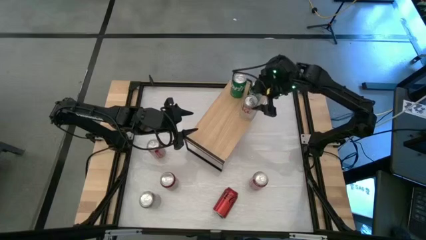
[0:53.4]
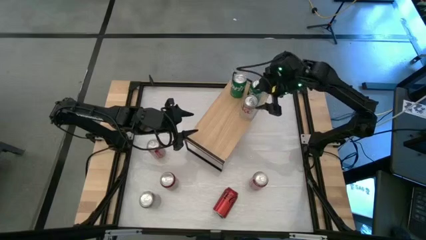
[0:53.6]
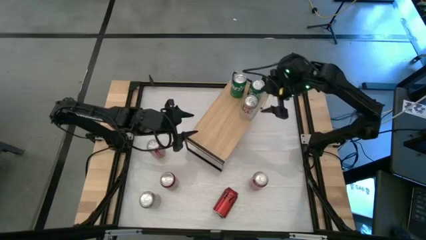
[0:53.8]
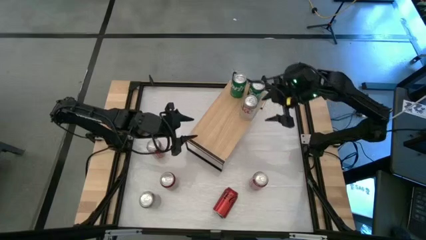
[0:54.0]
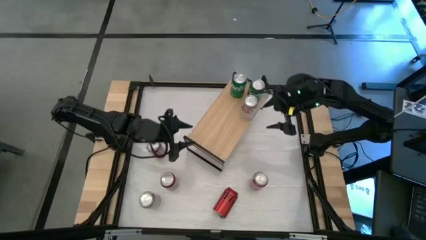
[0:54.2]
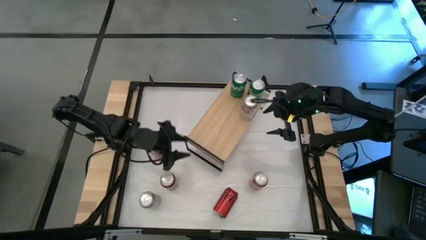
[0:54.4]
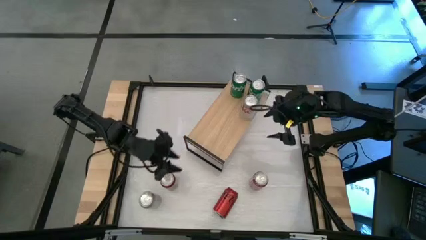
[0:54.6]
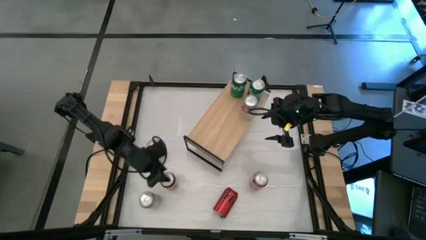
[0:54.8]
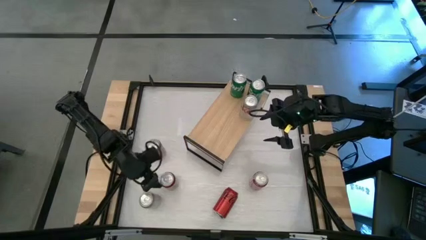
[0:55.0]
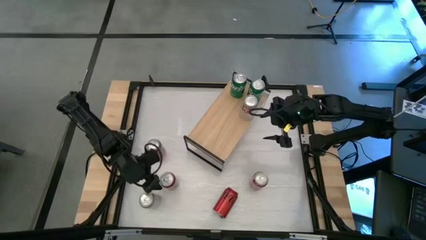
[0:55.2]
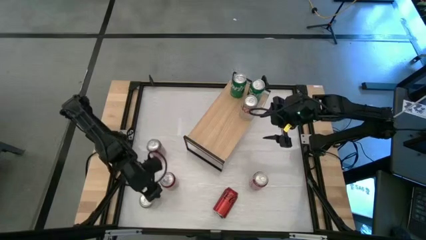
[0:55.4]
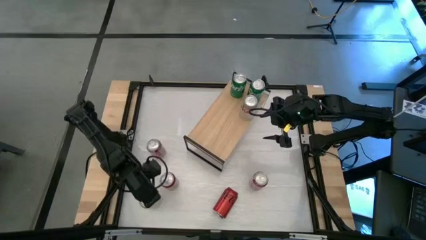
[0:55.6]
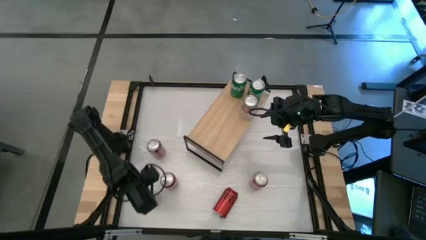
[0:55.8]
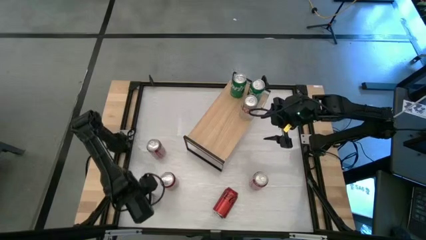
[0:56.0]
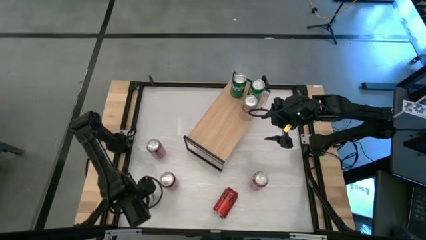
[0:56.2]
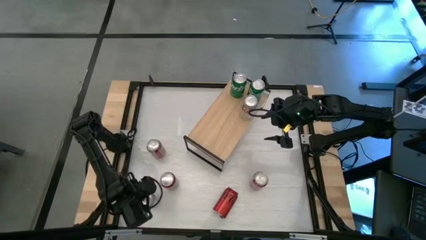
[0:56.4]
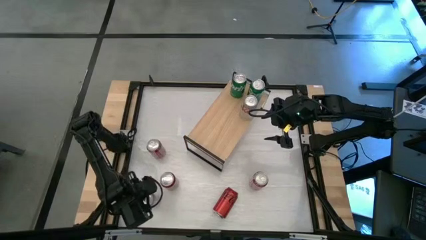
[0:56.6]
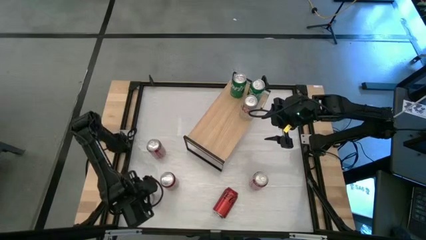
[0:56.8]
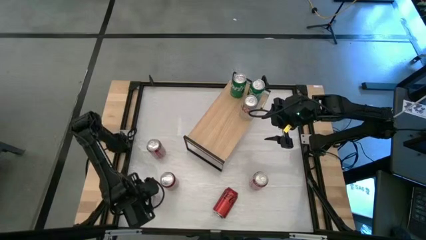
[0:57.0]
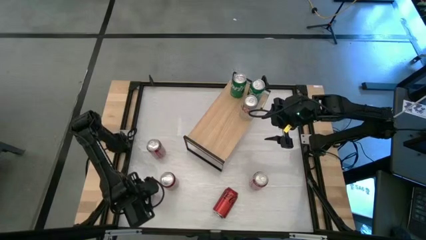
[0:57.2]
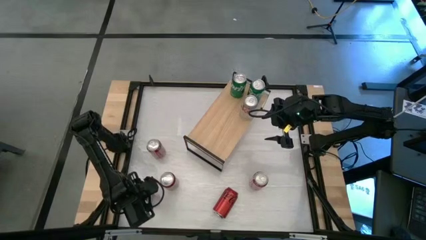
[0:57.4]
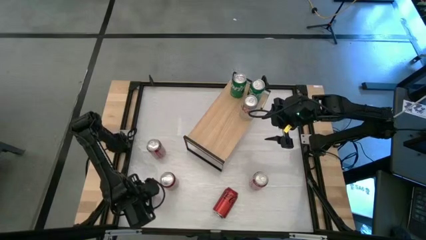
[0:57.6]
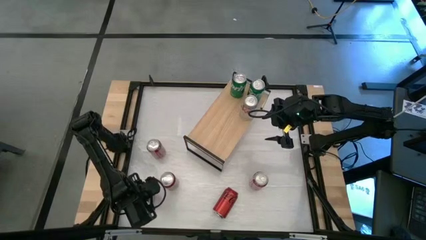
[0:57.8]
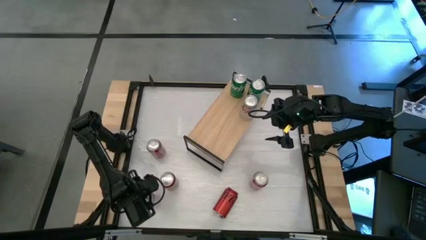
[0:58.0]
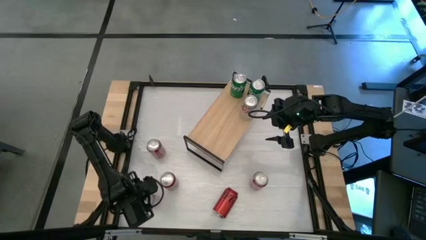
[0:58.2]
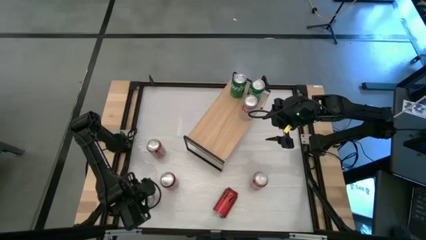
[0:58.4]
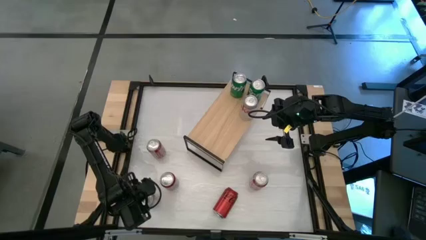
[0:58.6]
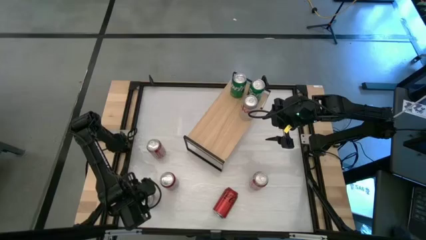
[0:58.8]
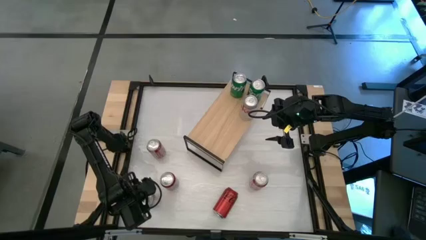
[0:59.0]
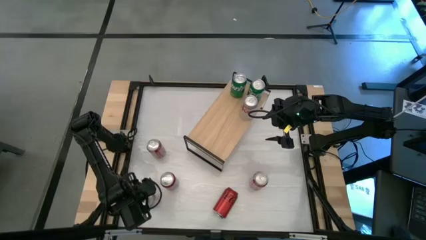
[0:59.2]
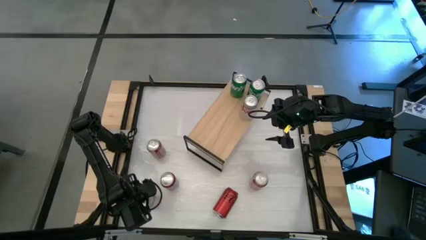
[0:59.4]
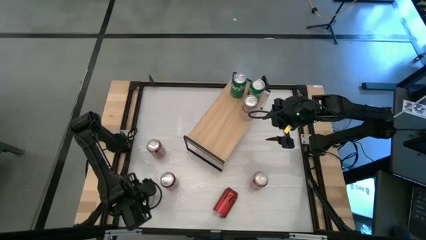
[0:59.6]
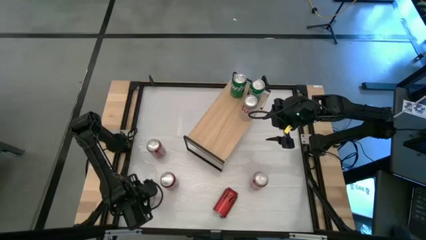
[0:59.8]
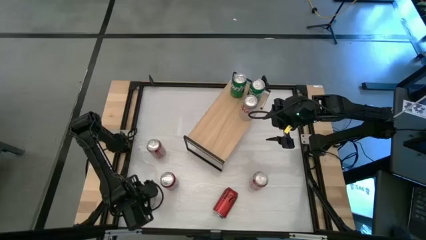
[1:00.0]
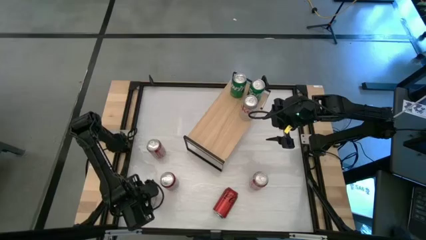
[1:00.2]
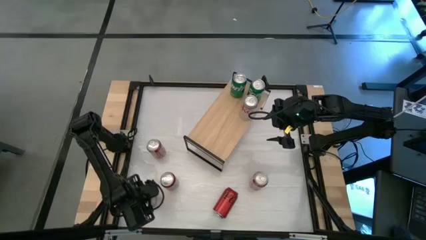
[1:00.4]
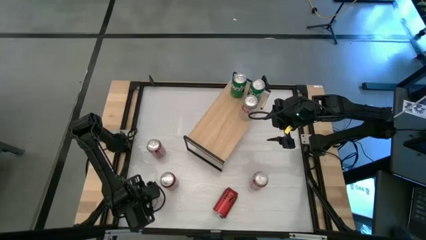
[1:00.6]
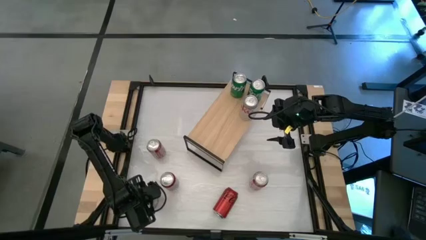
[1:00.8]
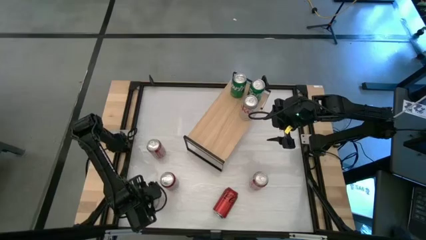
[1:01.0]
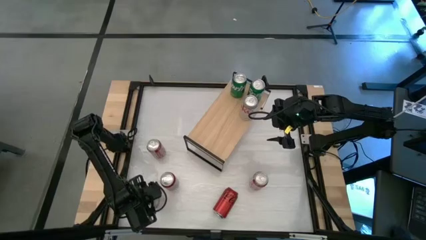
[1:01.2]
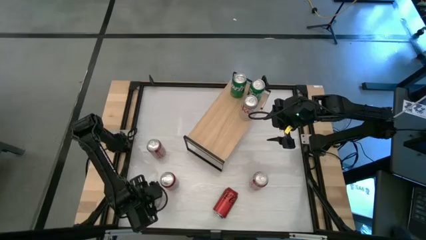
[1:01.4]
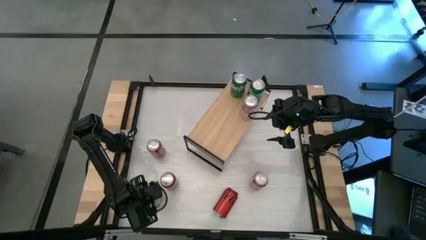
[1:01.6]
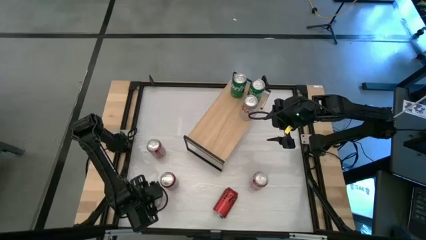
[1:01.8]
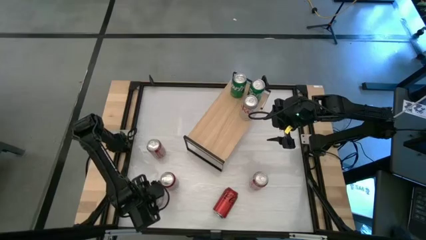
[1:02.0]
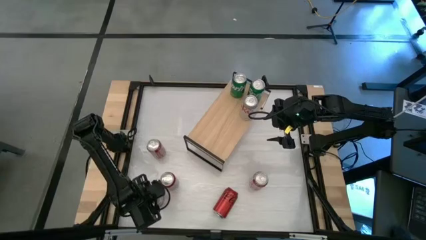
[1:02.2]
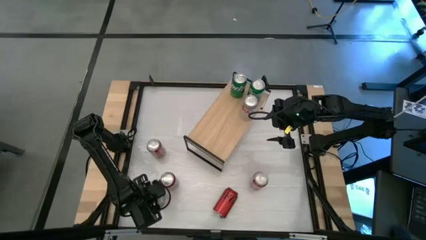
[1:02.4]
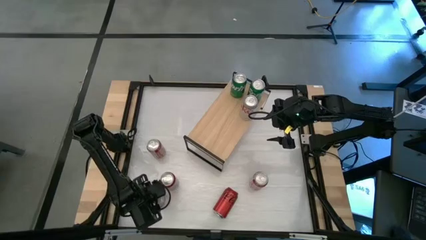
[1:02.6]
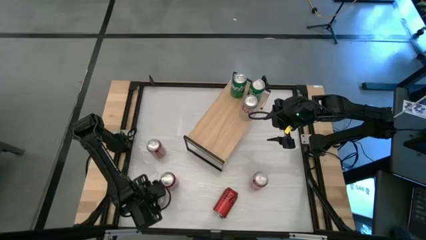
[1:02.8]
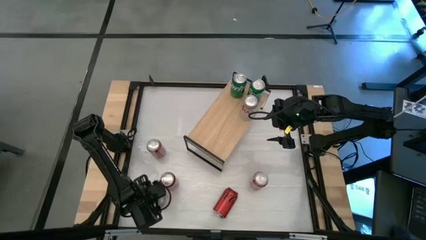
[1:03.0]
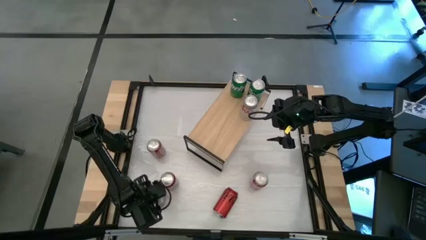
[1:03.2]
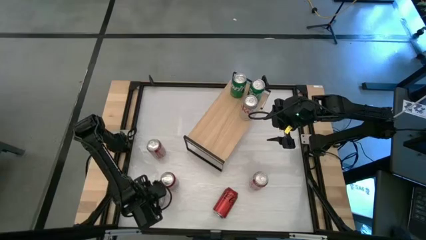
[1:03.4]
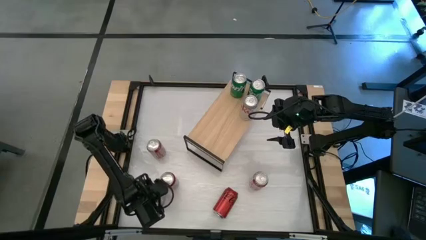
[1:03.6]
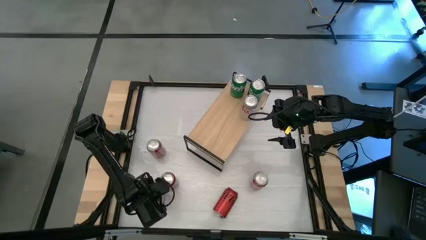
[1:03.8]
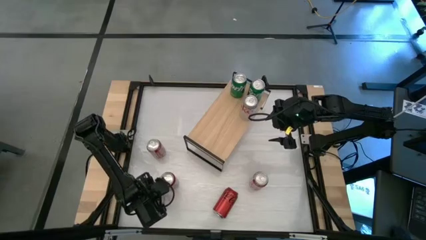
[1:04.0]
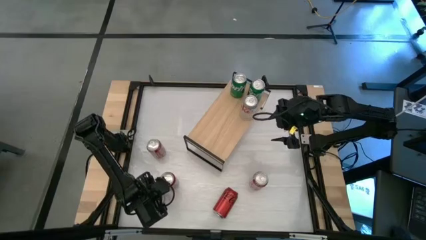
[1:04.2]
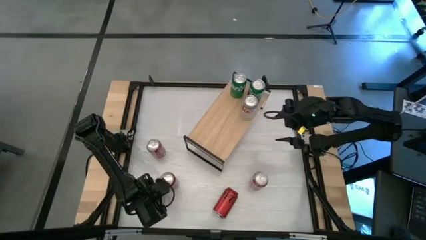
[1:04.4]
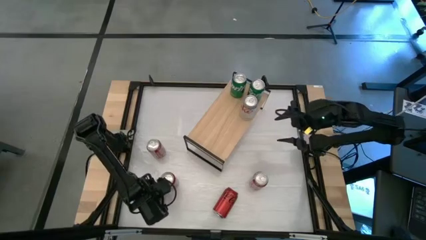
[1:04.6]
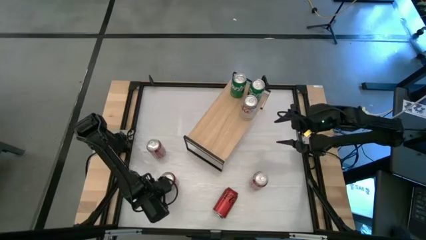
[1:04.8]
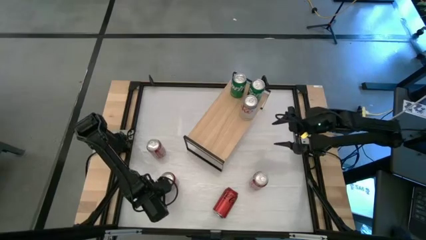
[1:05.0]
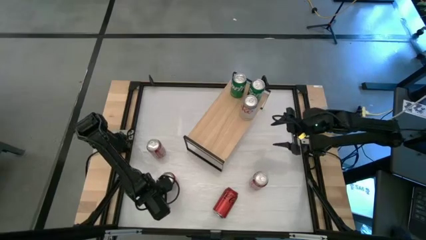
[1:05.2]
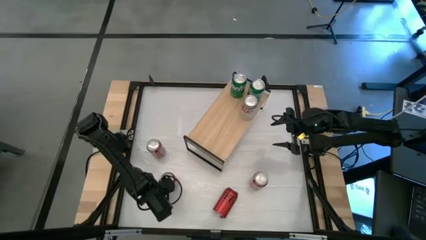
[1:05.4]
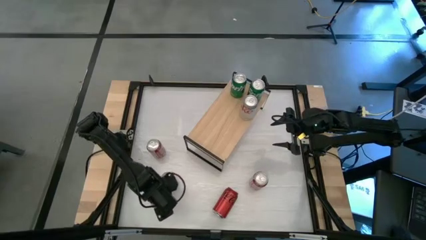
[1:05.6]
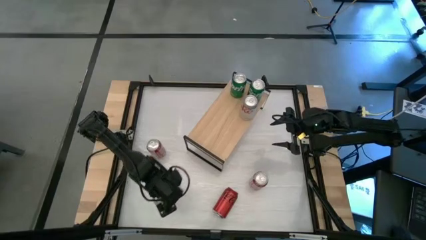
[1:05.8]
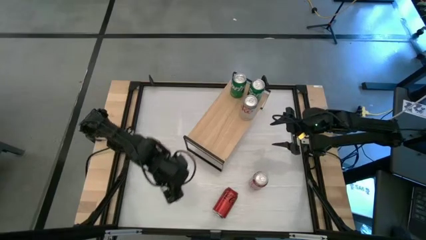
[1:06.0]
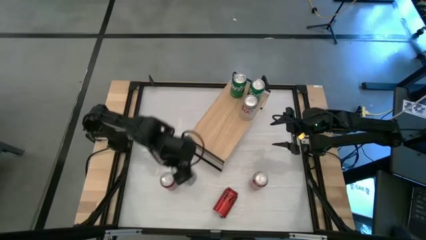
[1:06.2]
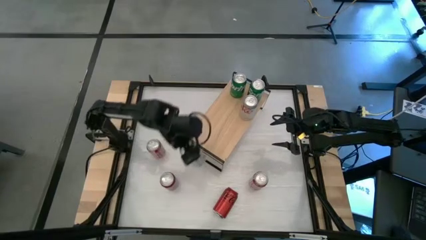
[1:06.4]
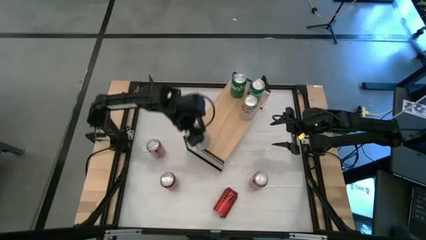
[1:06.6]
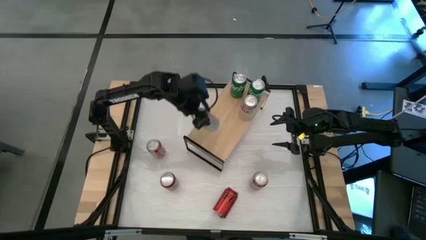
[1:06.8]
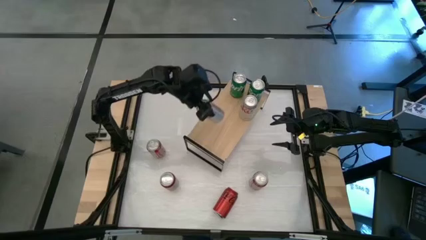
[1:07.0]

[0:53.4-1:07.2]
Task: Place canned beverage on shelf
Put the red-silver soda can on the shelf aligned with the other red-silver soda can
